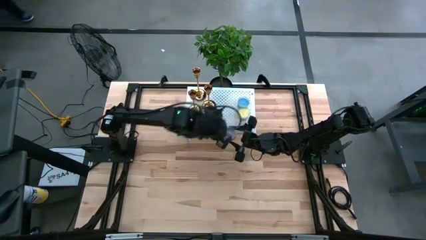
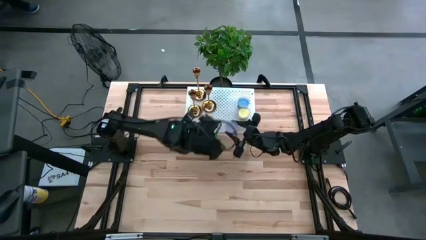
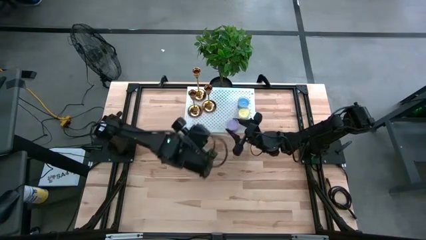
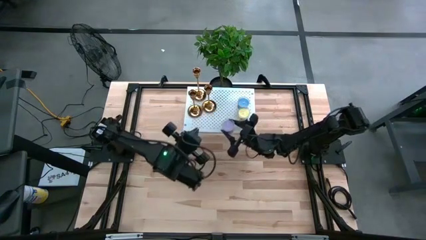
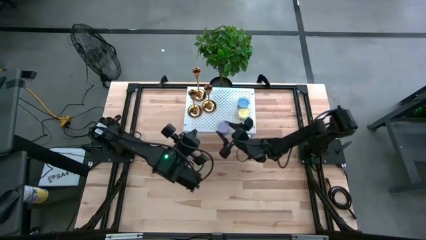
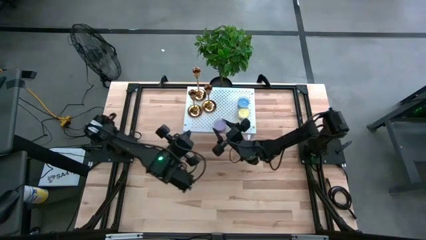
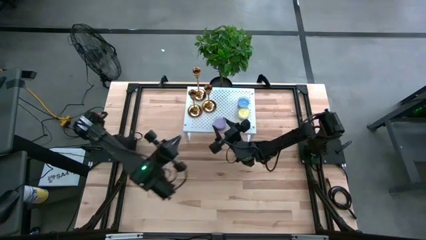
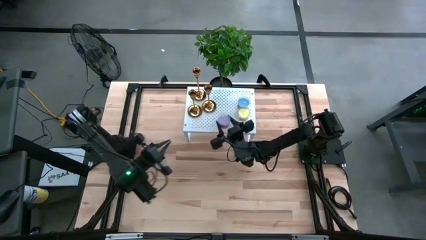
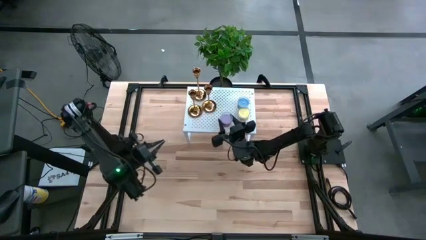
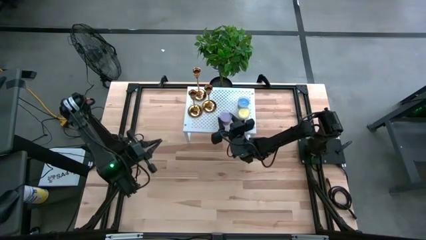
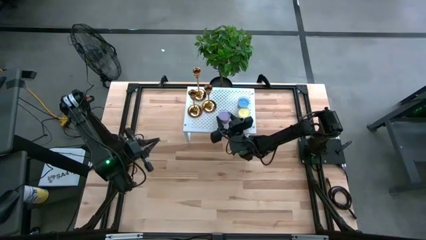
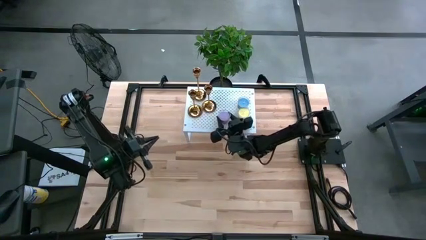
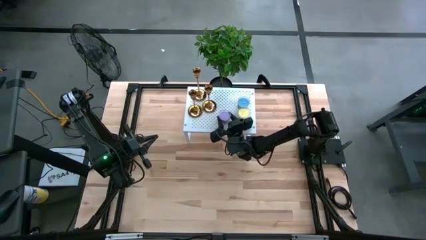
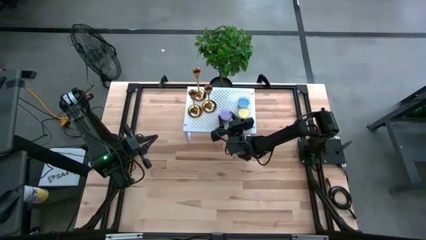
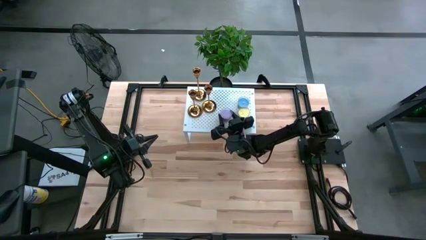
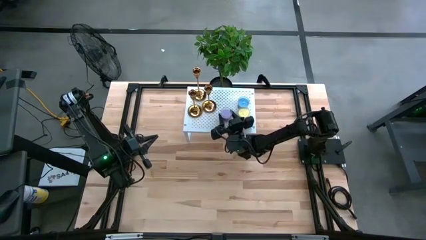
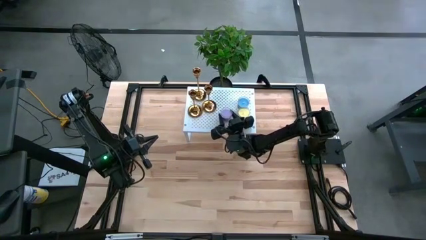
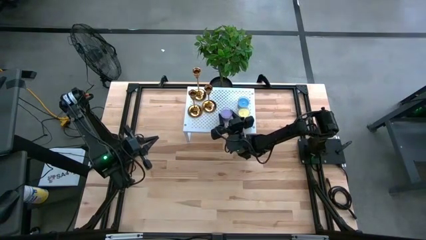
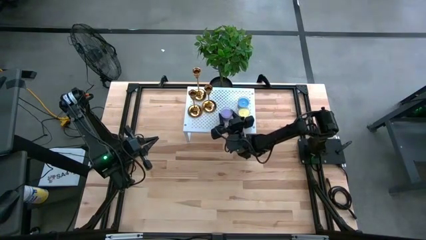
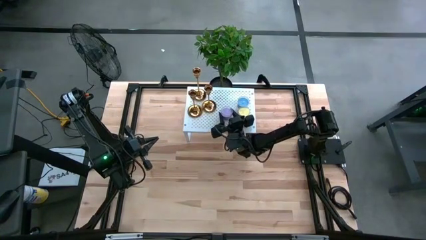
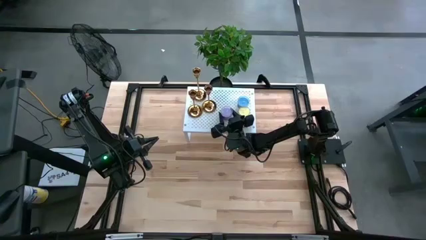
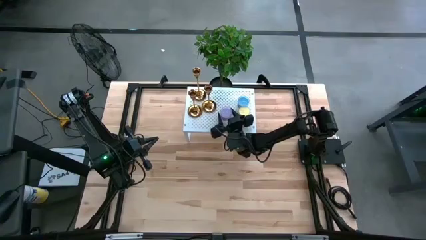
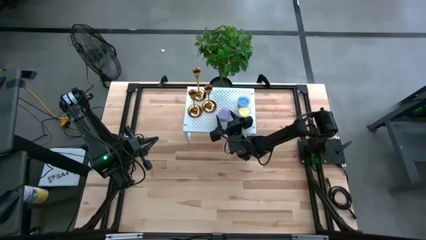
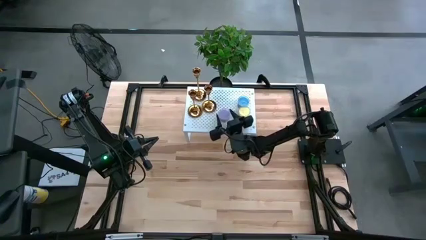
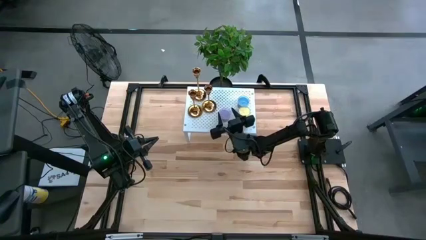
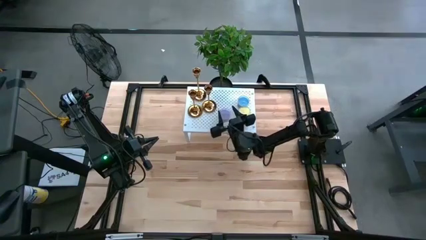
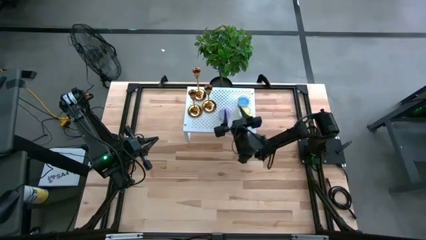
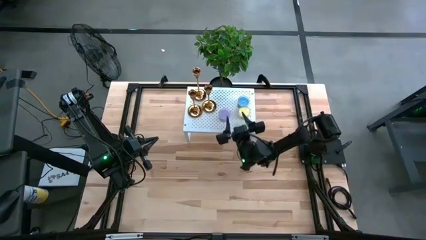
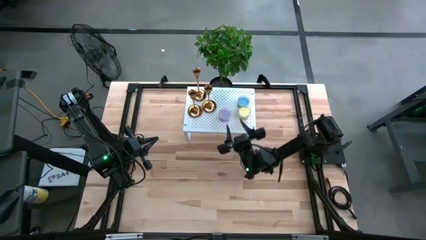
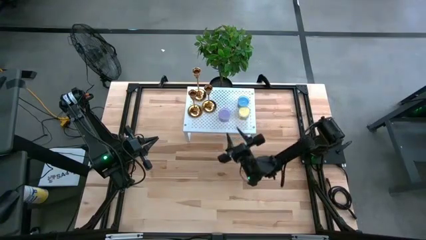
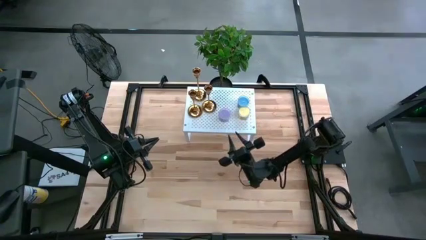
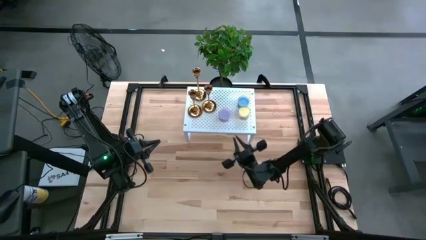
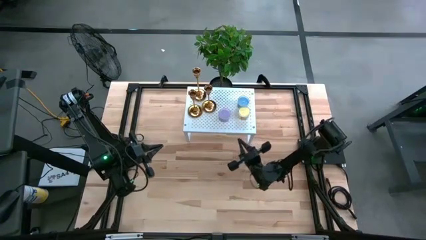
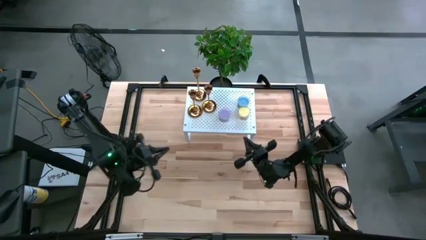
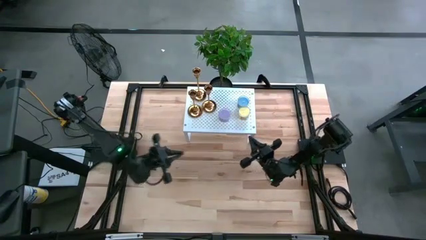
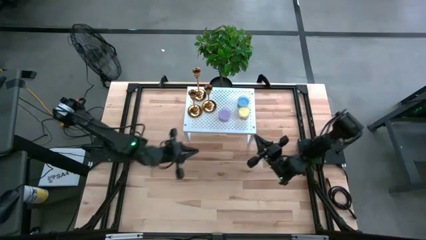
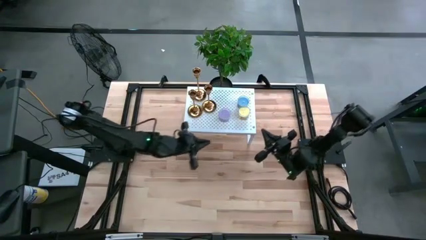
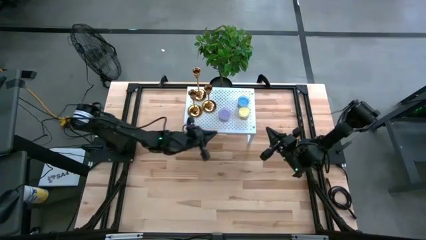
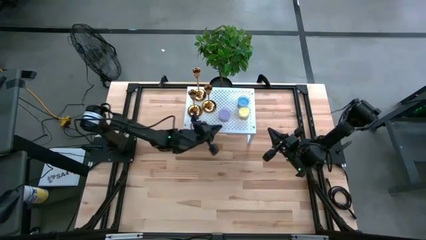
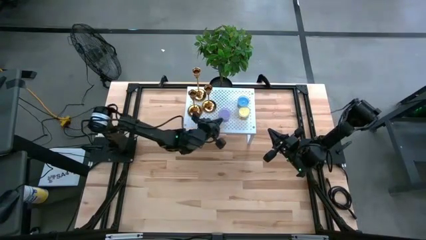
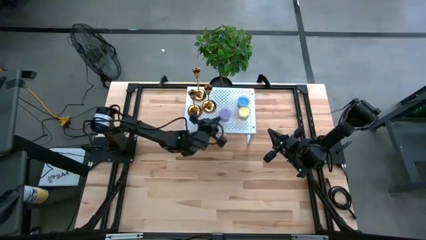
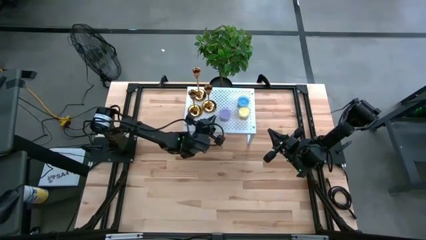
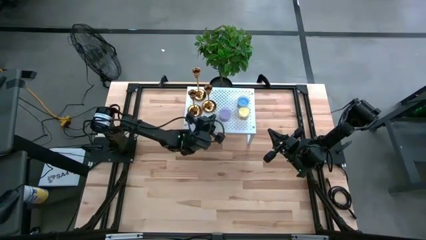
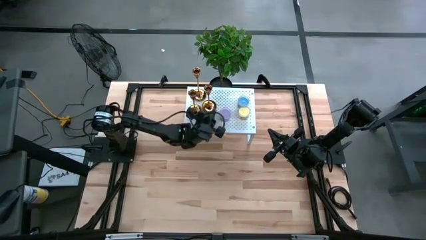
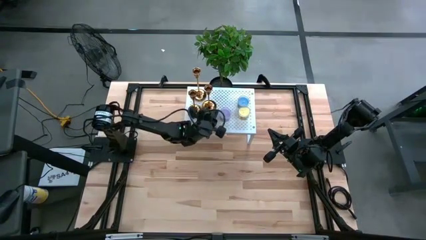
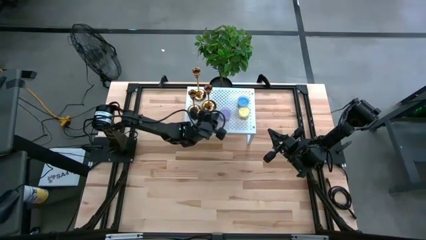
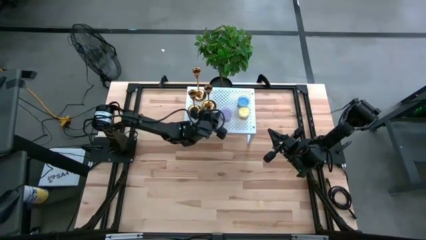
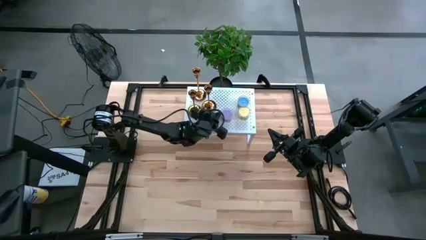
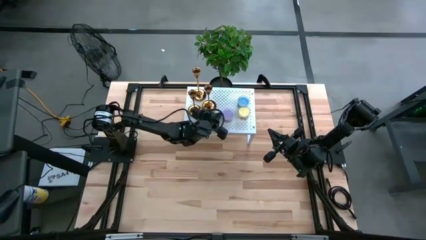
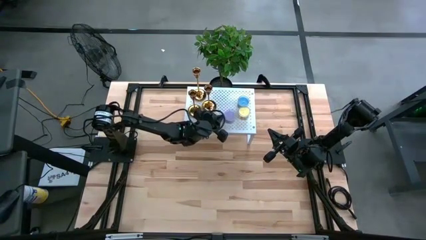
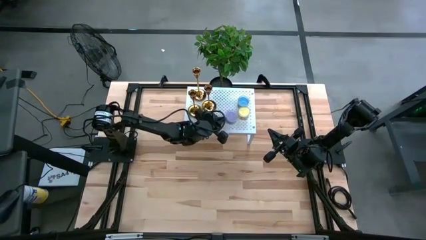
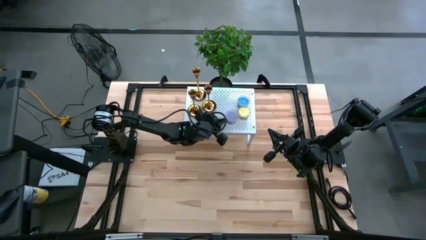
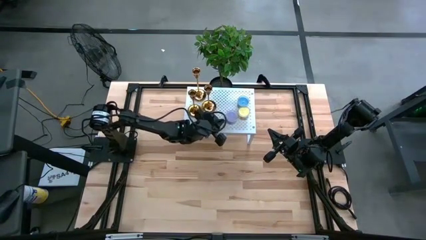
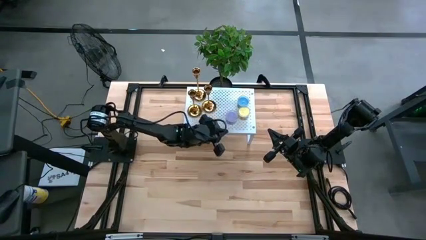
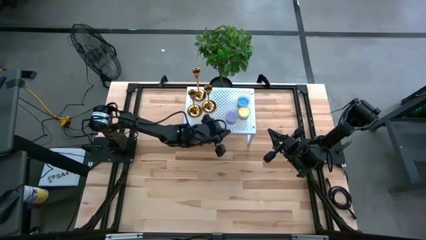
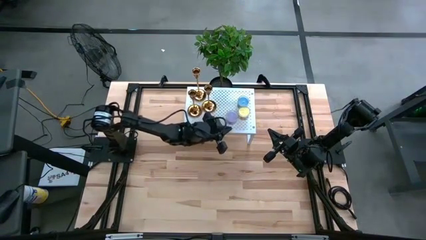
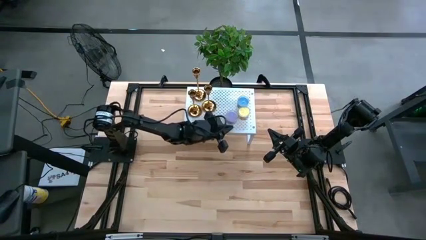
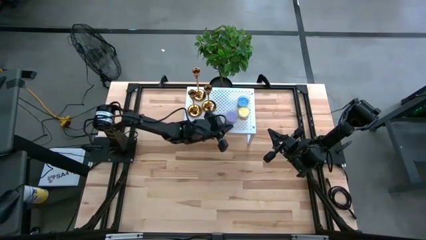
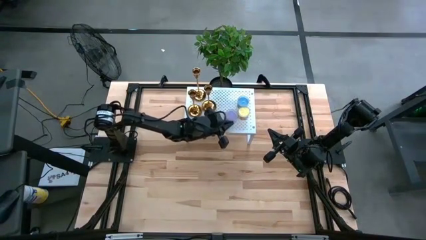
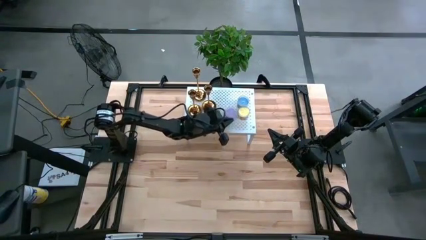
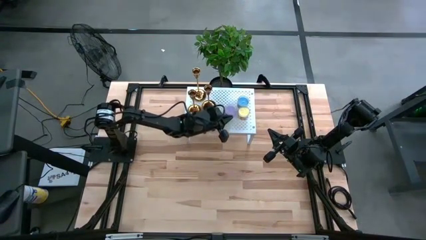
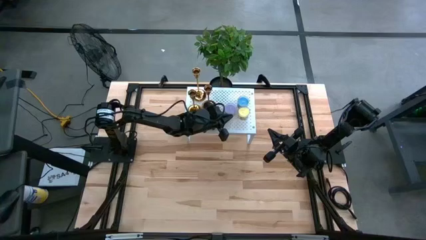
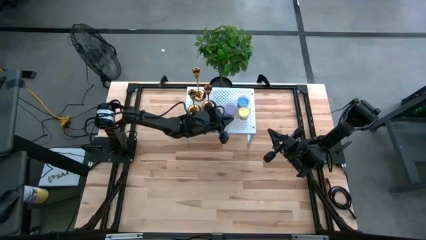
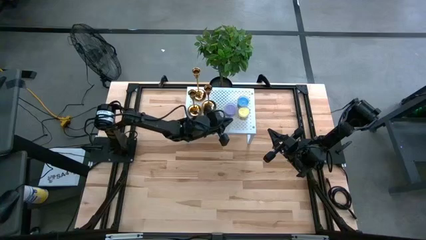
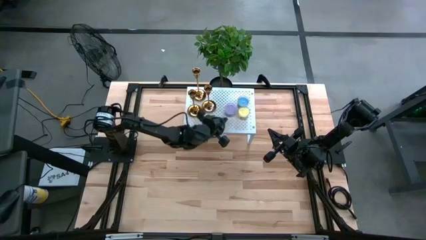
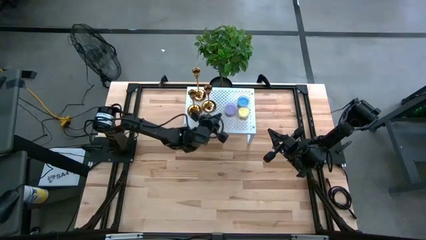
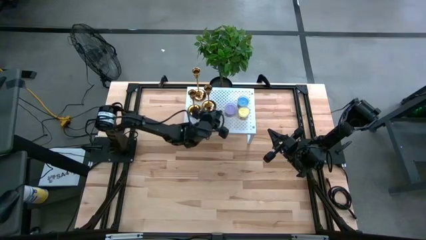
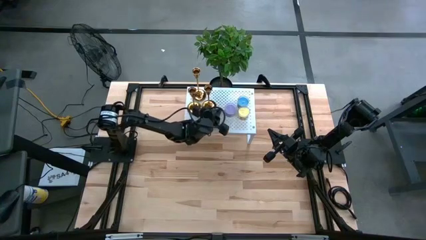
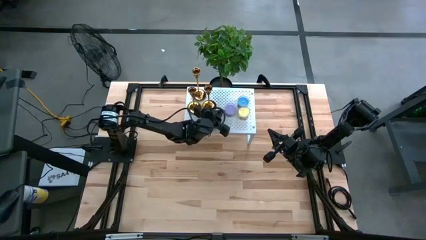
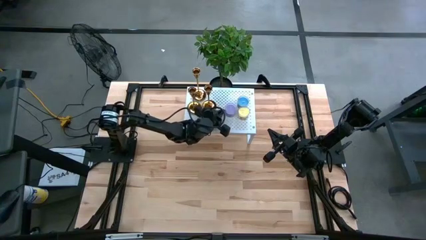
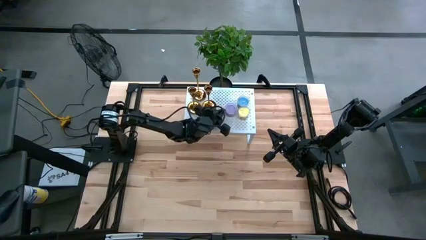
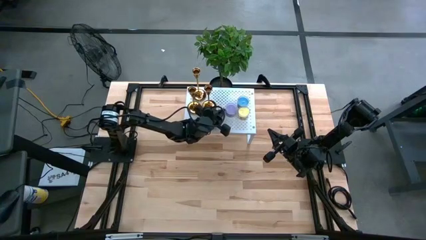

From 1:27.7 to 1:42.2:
Task: Pick & Place candle stick holders
Put the violet scented candle on the shelf

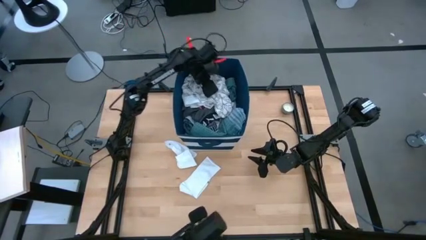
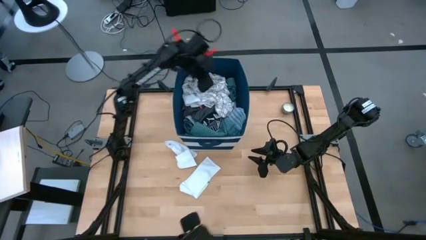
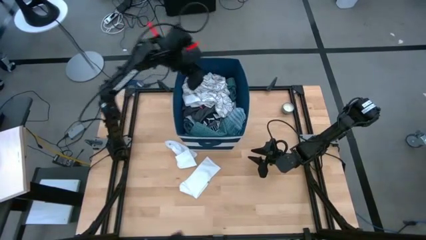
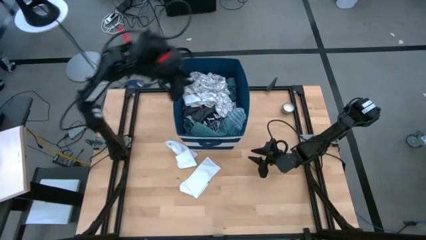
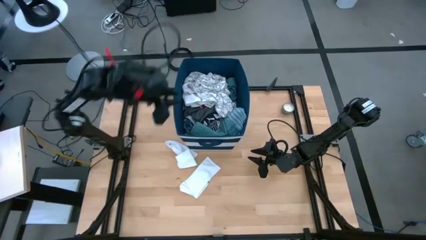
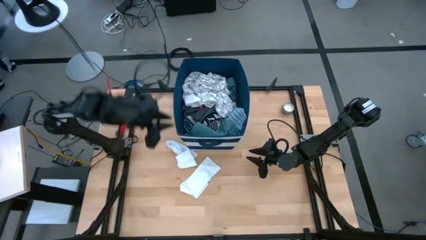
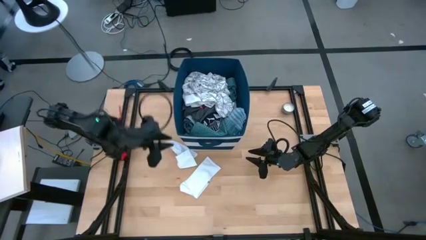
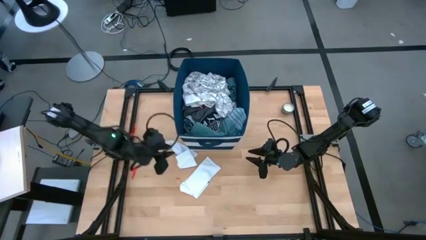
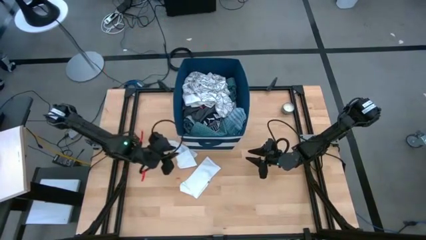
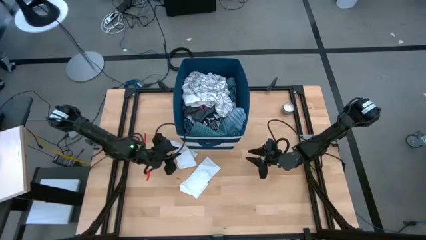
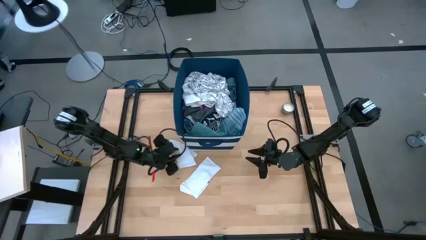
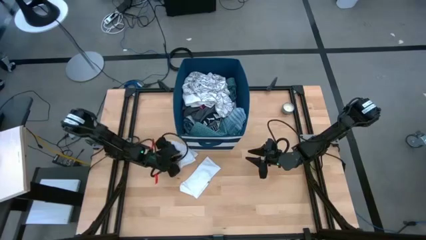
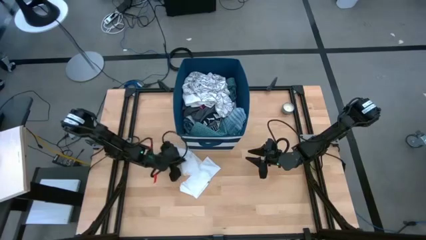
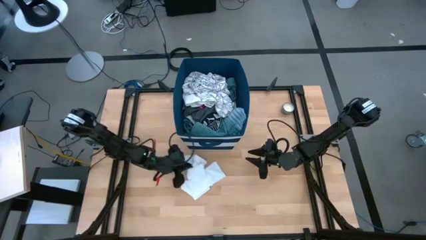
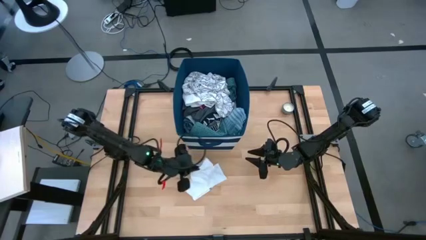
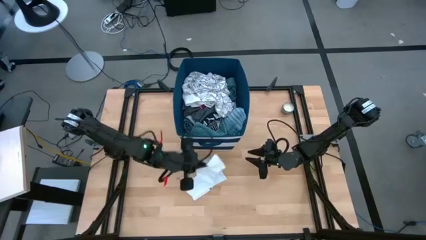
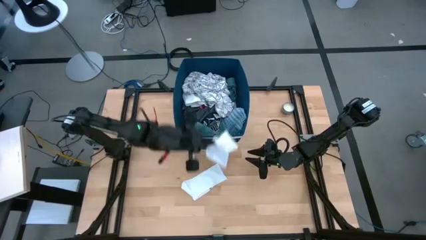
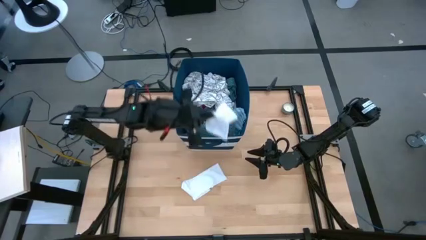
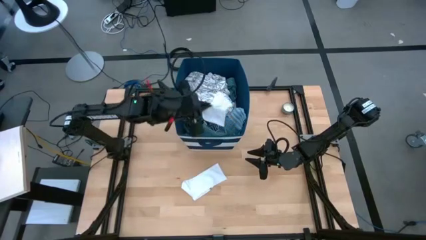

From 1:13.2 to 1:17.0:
Task: Sort clothes
Put the top white sock into the blue bin
